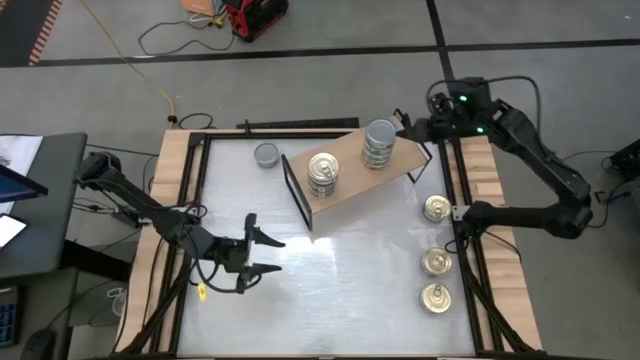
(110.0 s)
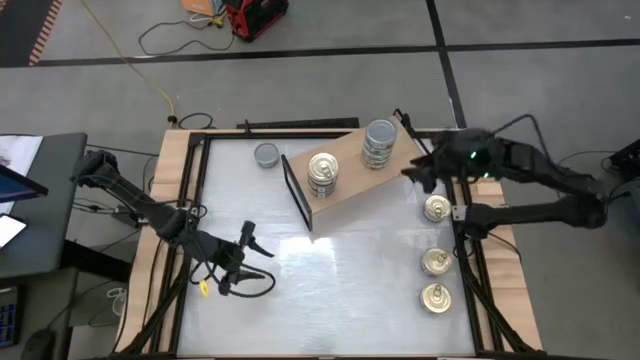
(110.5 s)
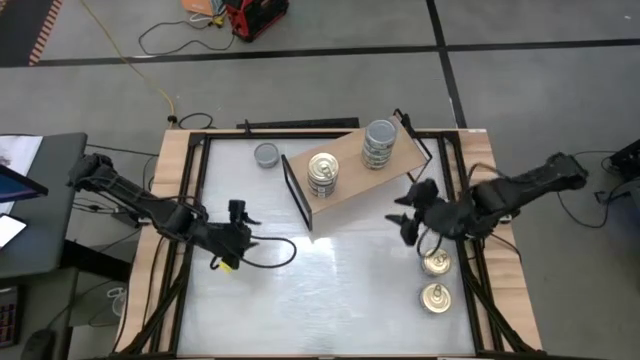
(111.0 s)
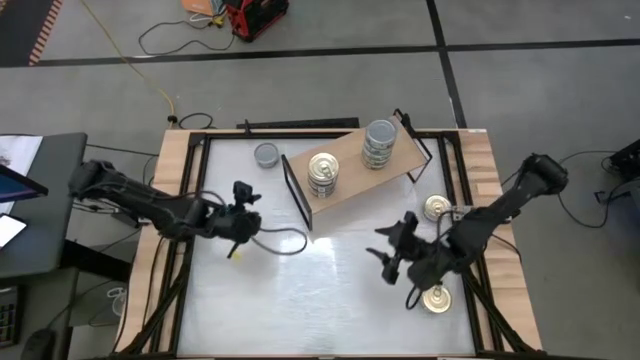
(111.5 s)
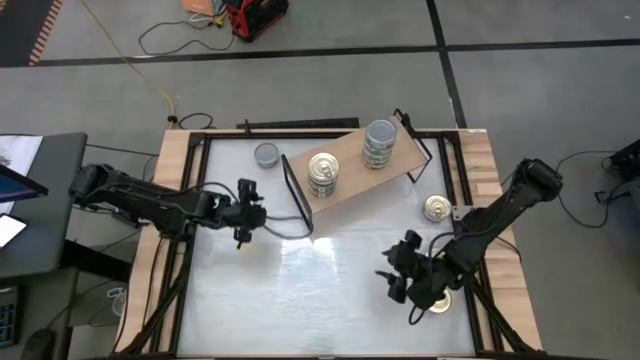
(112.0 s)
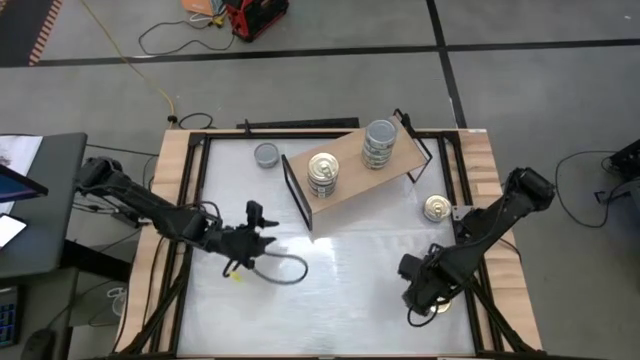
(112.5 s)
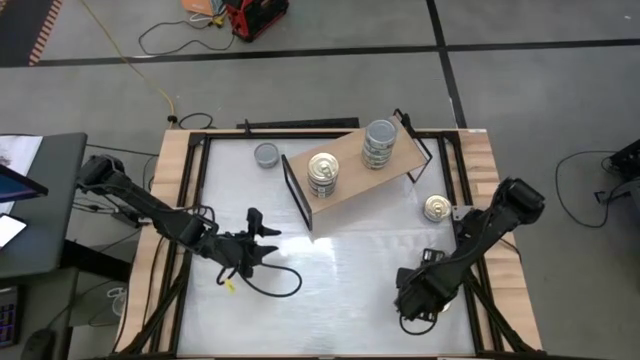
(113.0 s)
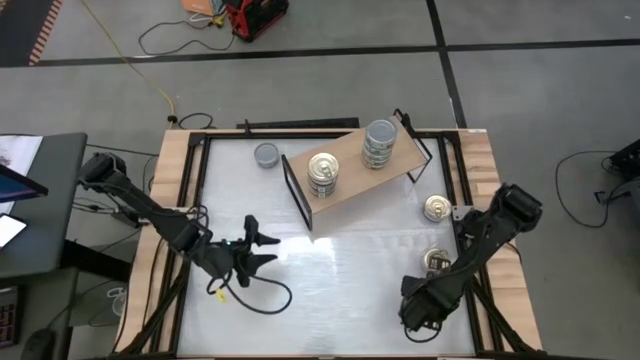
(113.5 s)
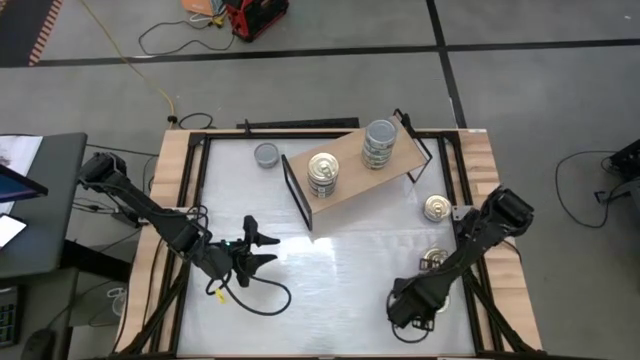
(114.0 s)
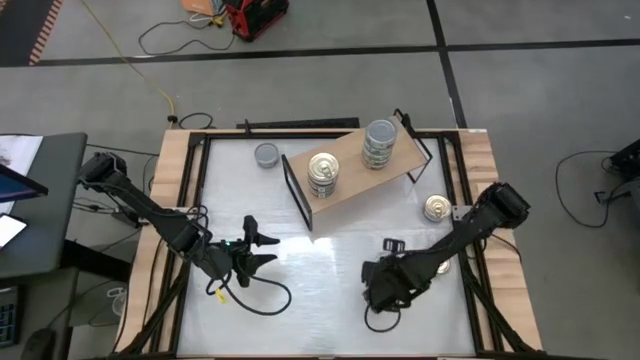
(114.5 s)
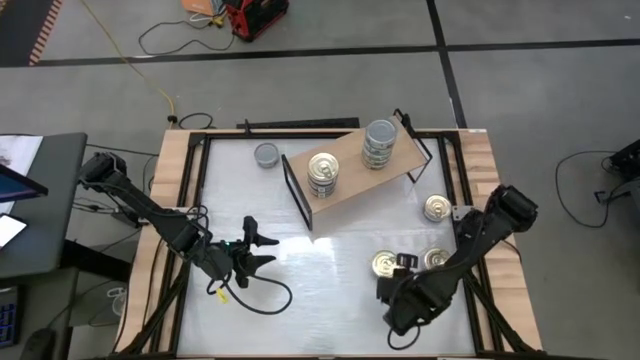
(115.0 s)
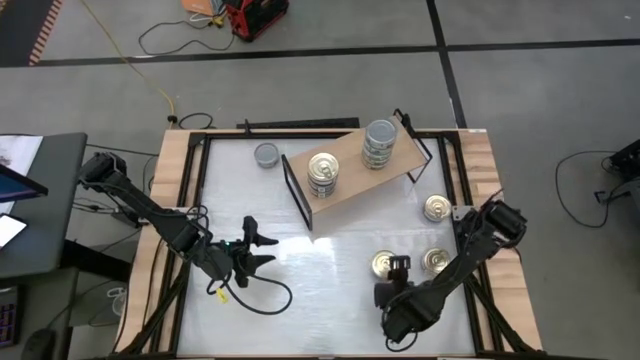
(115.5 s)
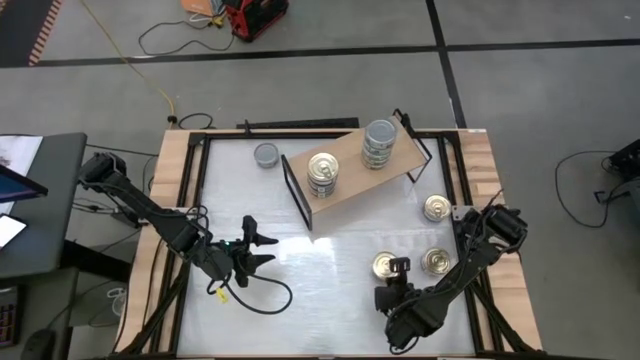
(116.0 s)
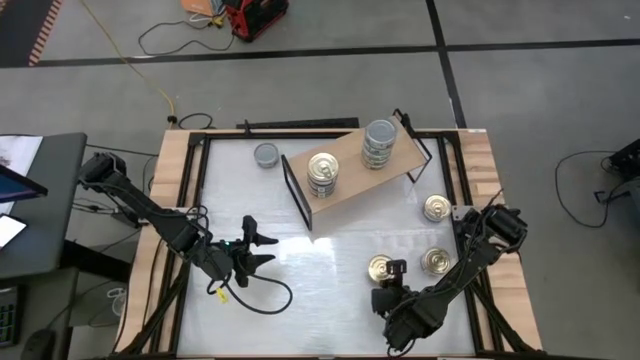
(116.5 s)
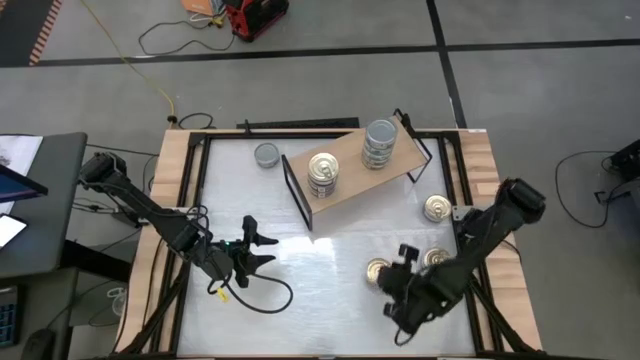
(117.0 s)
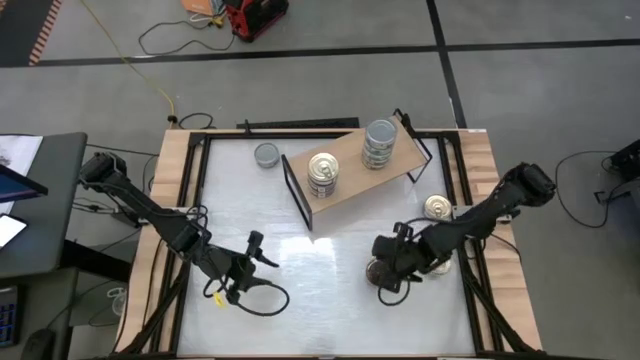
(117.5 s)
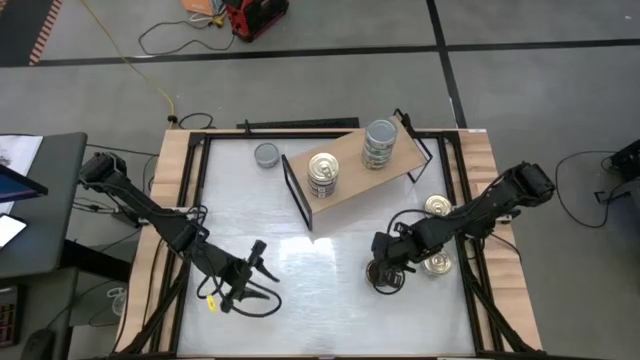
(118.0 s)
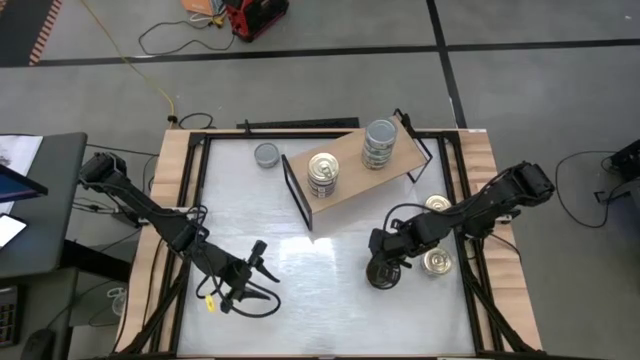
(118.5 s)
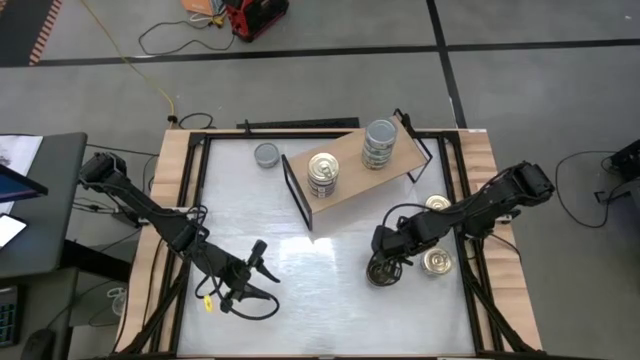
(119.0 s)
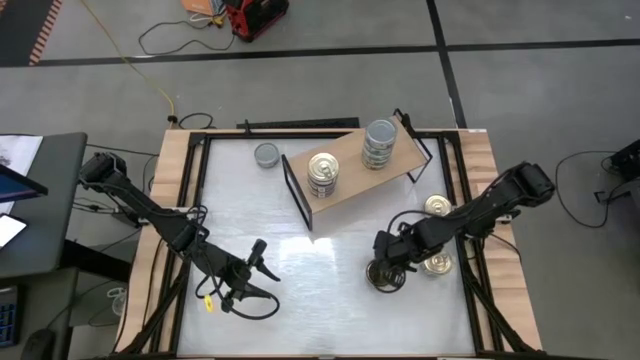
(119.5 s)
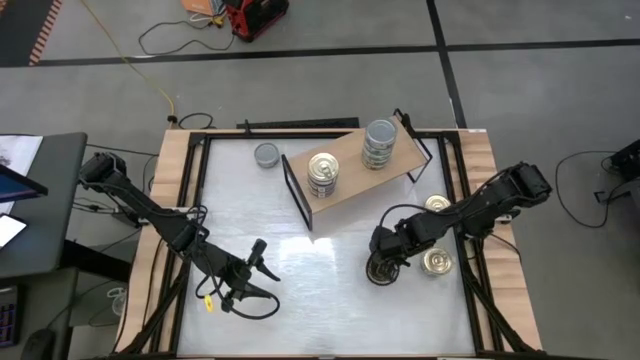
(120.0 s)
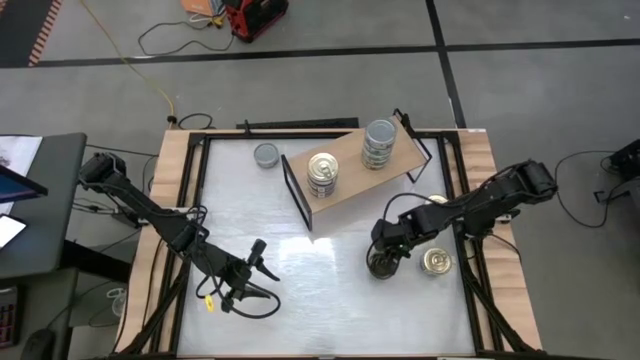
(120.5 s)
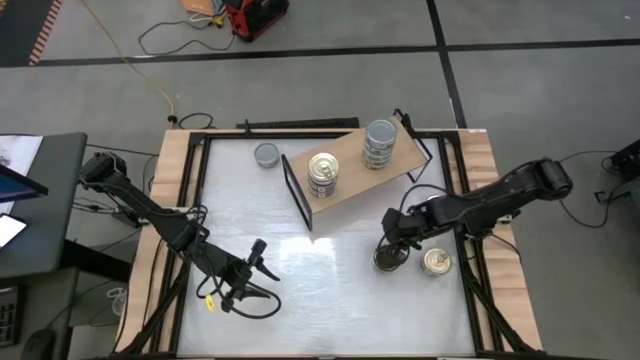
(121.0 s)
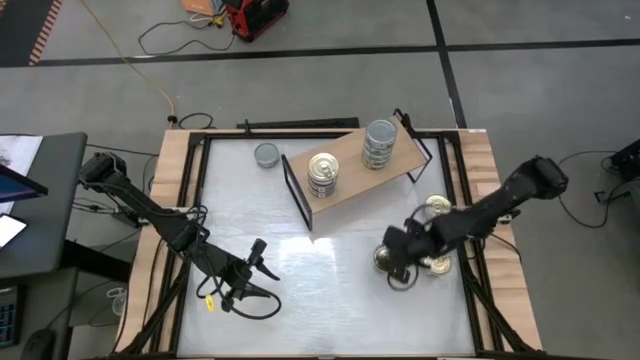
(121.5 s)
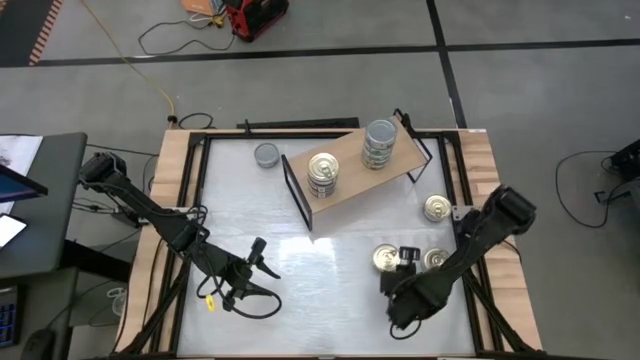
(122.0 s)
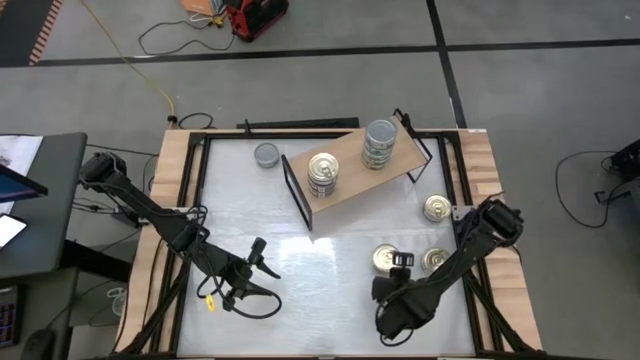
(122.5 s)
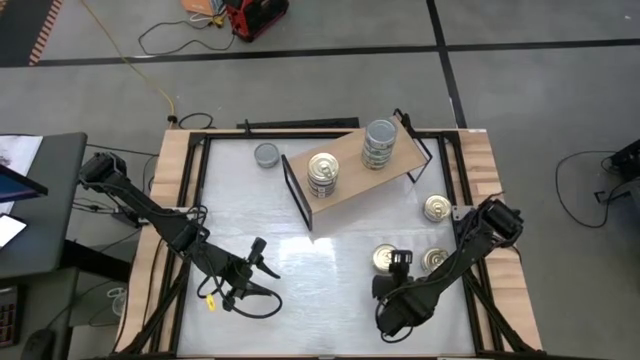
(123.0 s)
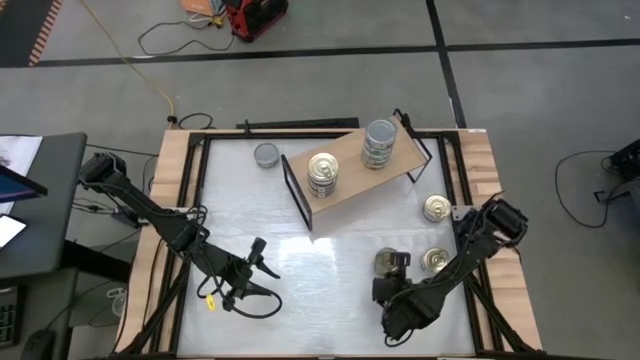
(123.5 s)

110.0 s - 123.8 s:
Task: Stack canned seafood by type on shelf
Stack the blue tuna can on top of the blue tuna can

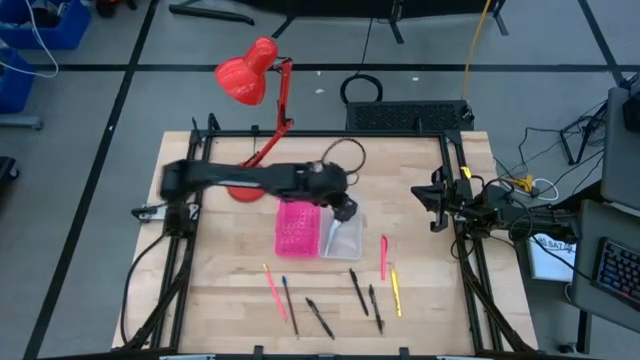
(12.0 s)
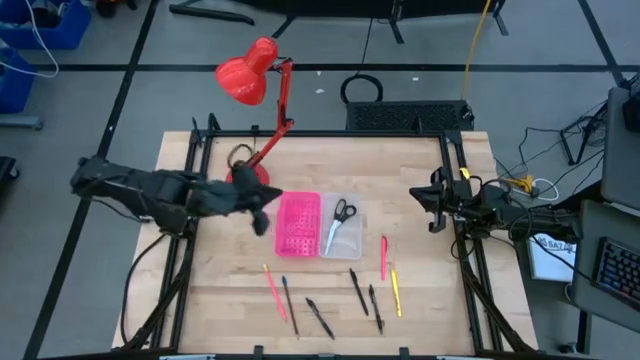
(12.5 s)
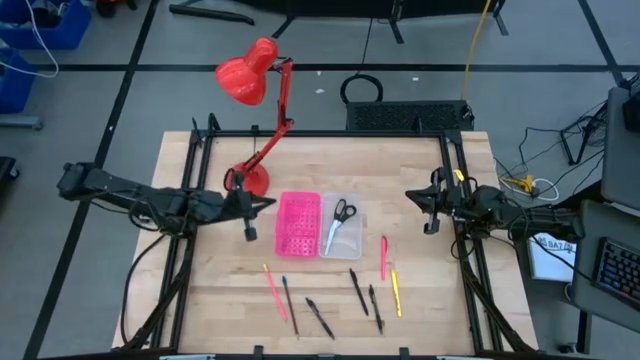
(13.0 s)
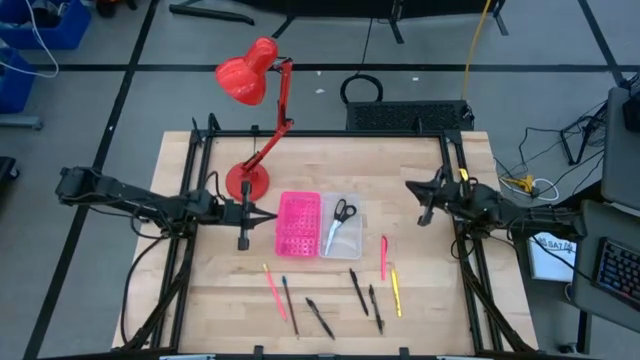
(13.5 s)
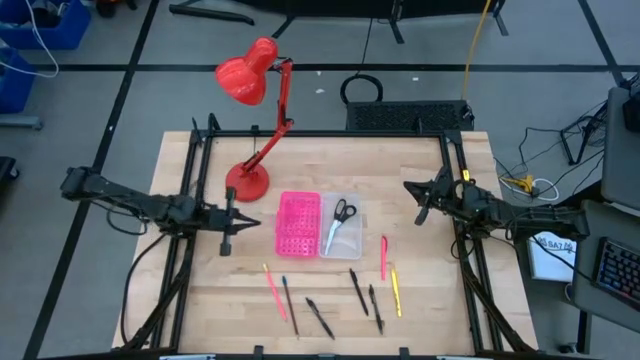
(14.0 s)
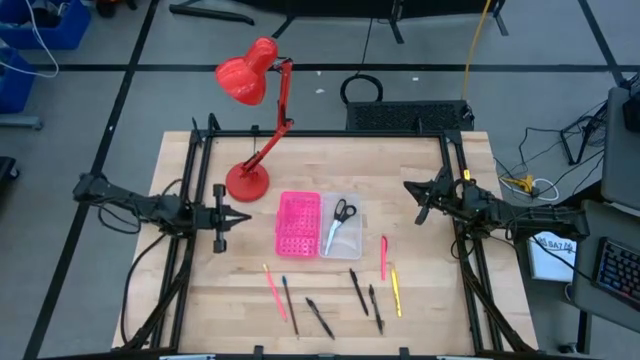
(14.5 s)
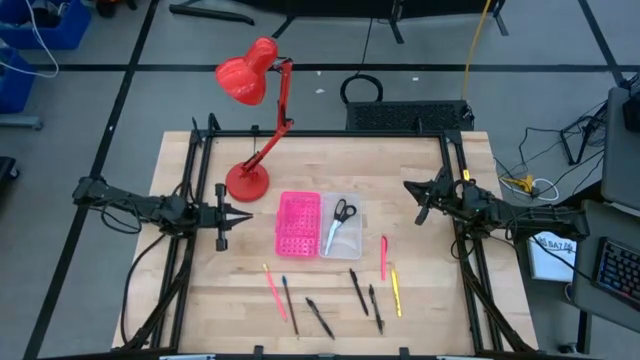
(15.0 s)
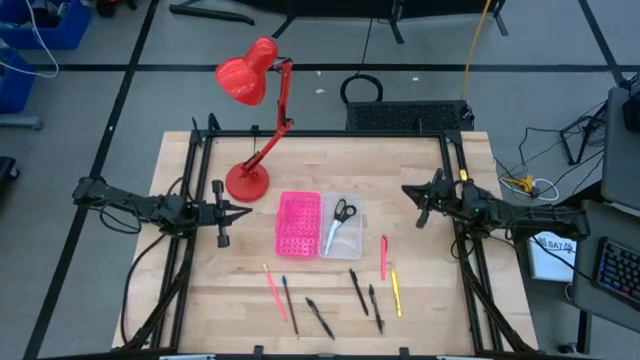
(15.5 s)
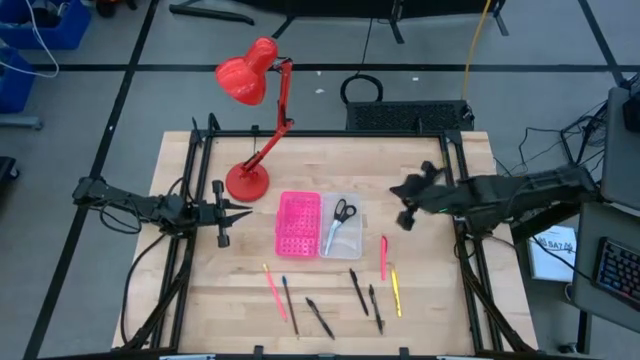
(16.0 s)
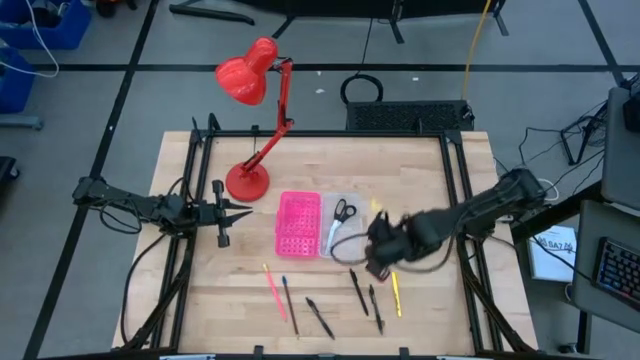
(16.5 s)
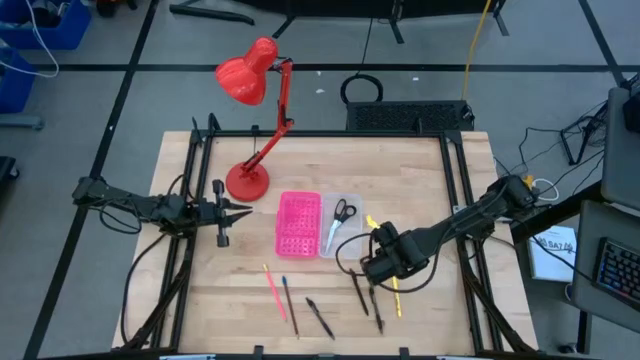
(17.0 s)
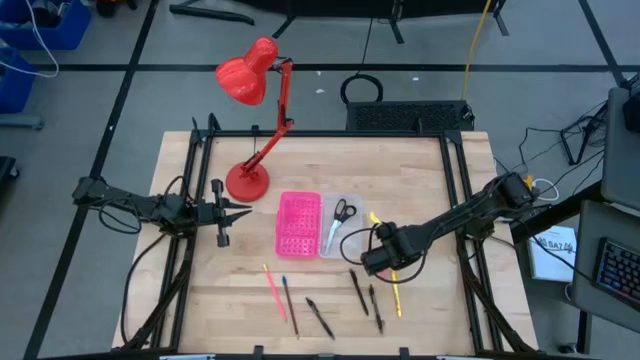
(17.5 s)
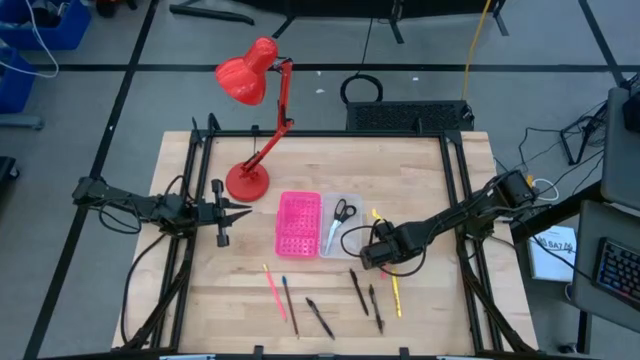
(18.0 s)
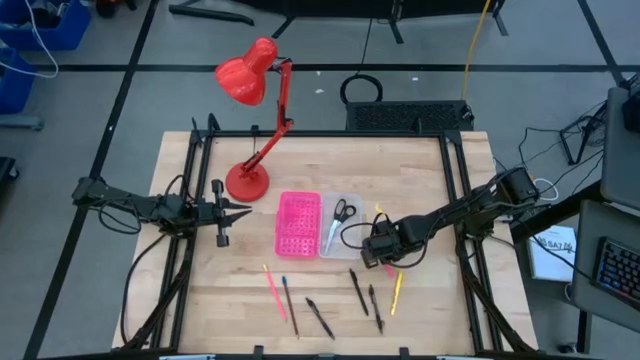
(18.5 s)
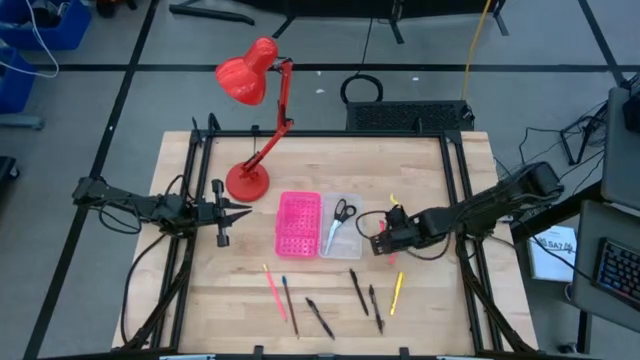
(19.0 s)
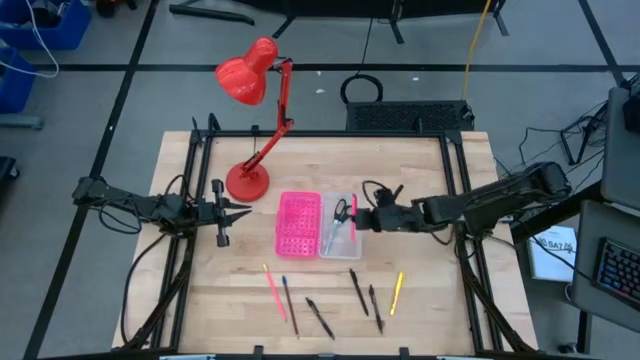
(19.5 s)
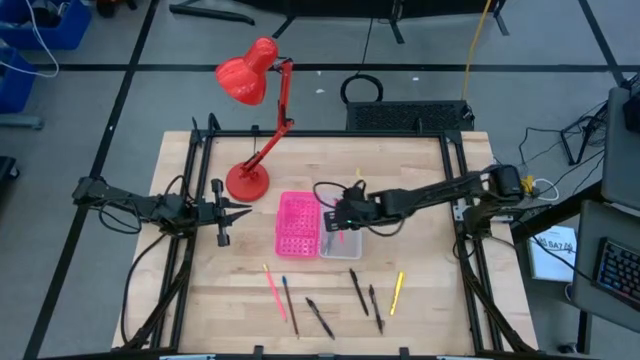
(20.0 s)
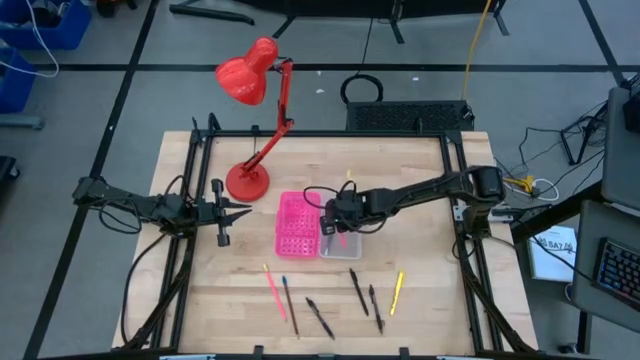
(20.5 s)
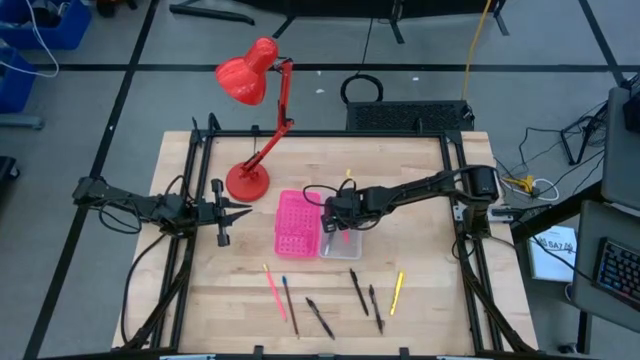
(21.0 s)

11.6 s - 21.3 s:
Task: Pick & place school supplies into a supply box
Put the pink pen into the supply box
